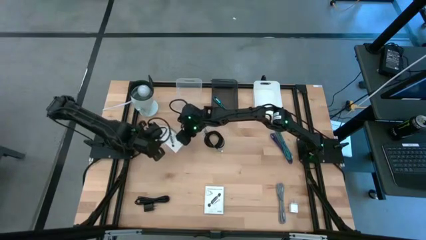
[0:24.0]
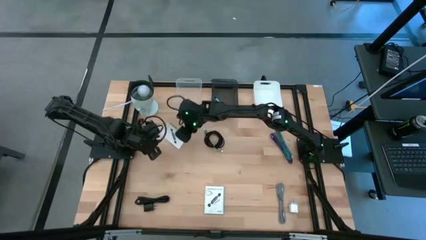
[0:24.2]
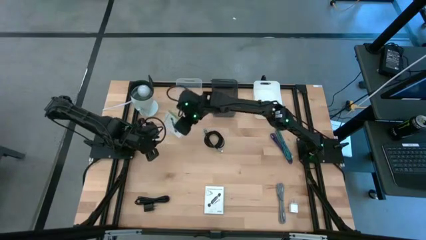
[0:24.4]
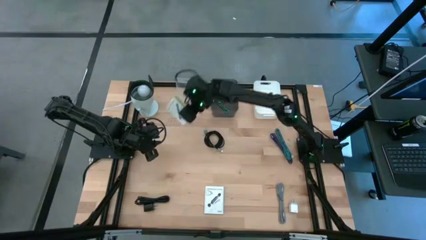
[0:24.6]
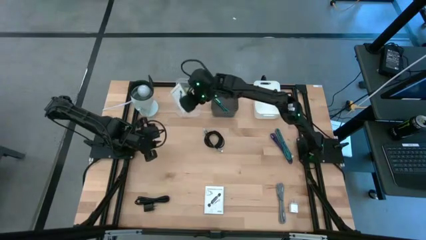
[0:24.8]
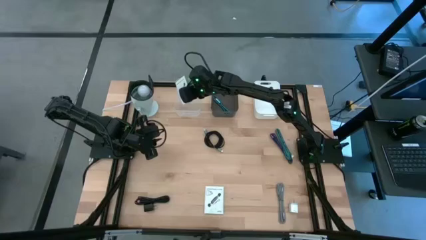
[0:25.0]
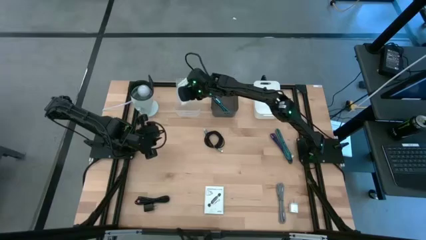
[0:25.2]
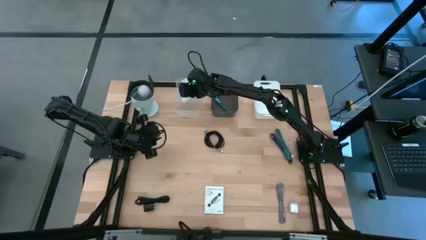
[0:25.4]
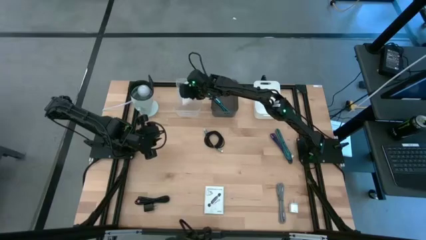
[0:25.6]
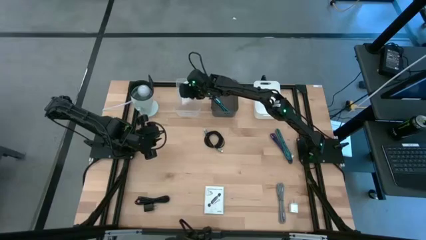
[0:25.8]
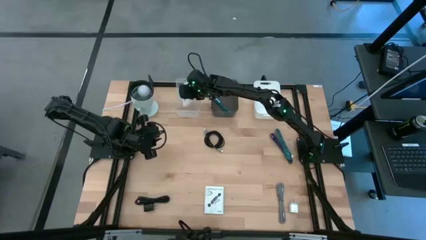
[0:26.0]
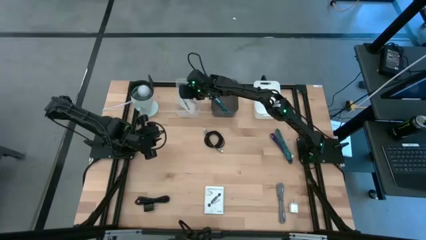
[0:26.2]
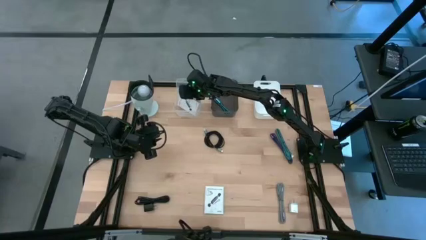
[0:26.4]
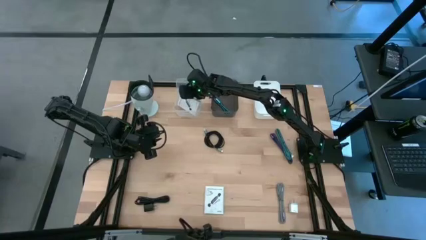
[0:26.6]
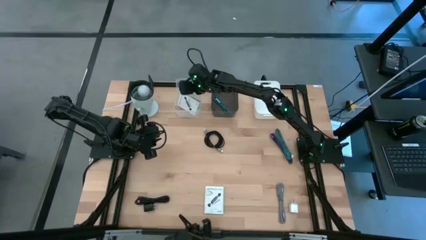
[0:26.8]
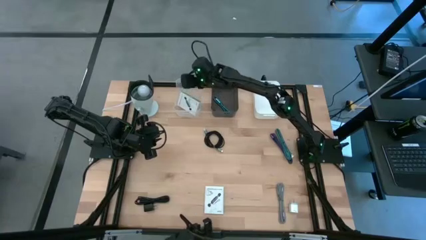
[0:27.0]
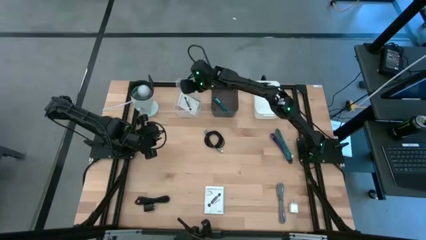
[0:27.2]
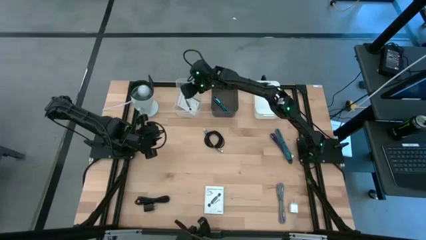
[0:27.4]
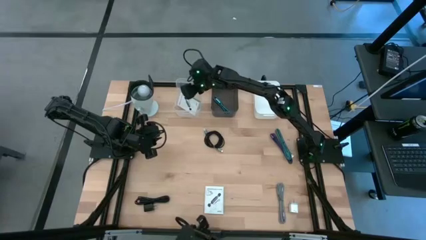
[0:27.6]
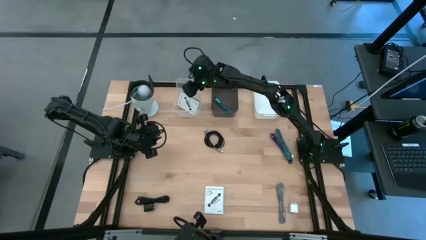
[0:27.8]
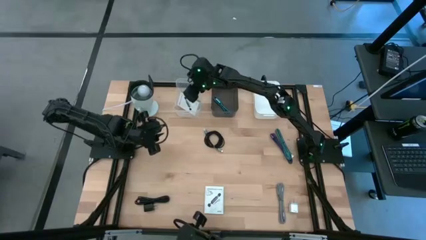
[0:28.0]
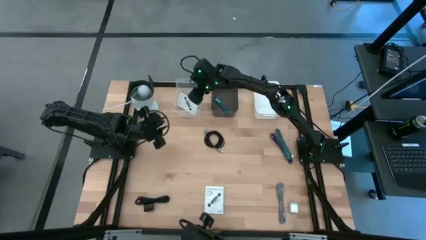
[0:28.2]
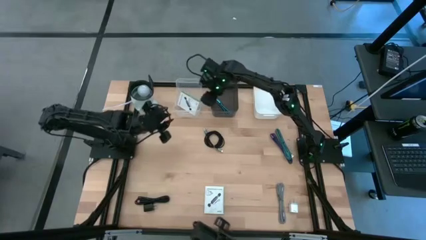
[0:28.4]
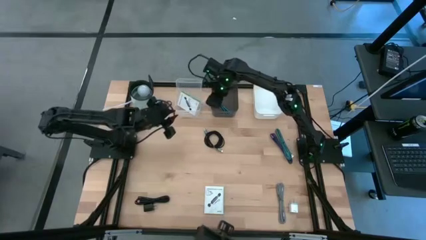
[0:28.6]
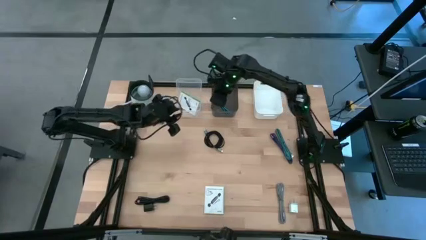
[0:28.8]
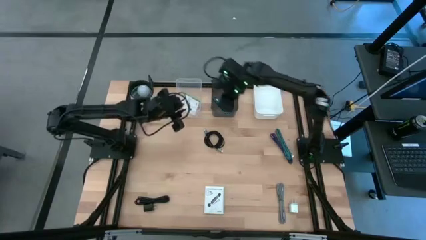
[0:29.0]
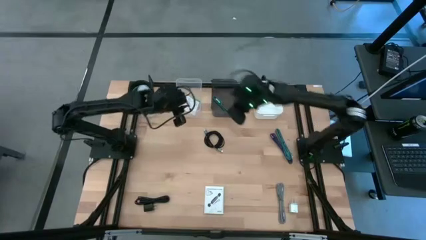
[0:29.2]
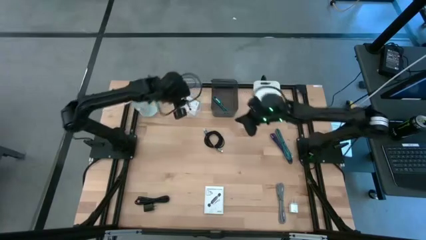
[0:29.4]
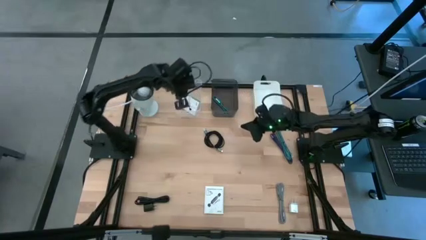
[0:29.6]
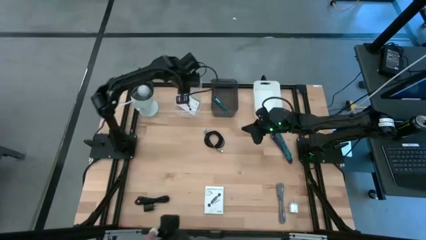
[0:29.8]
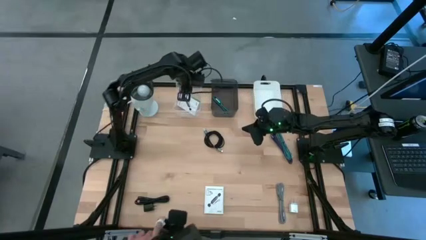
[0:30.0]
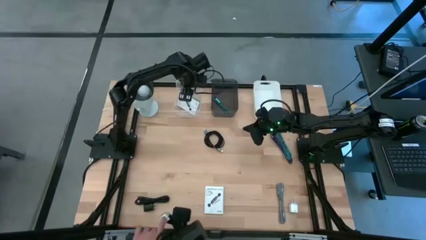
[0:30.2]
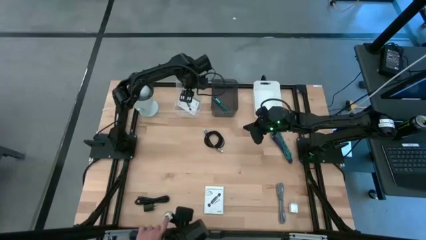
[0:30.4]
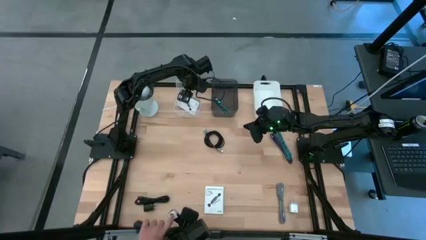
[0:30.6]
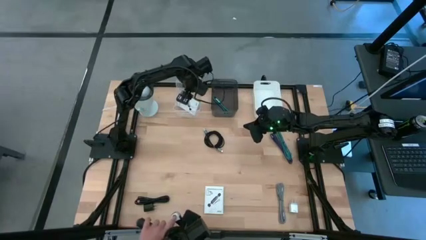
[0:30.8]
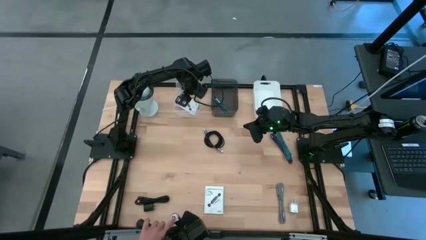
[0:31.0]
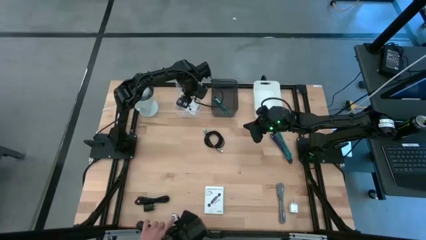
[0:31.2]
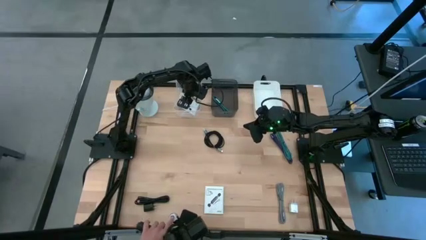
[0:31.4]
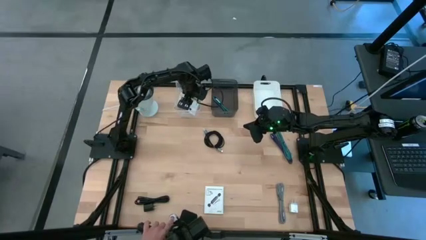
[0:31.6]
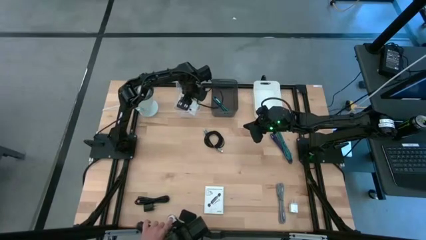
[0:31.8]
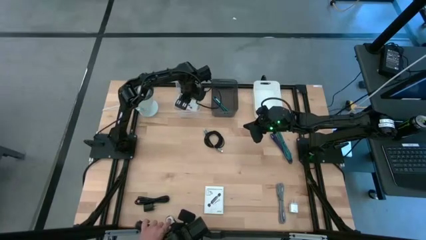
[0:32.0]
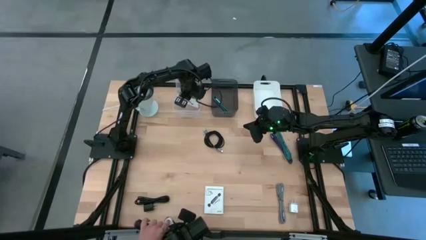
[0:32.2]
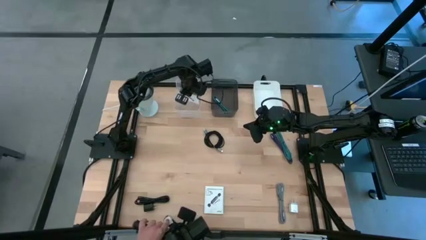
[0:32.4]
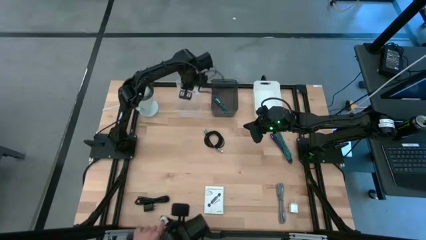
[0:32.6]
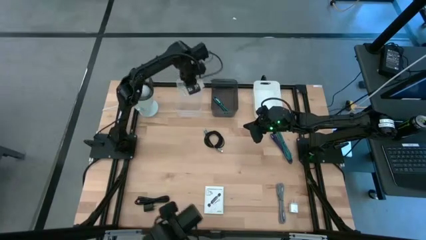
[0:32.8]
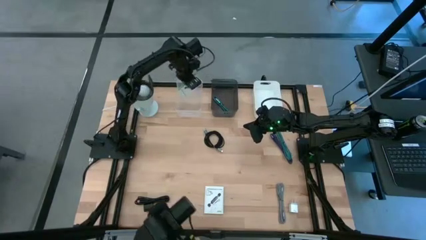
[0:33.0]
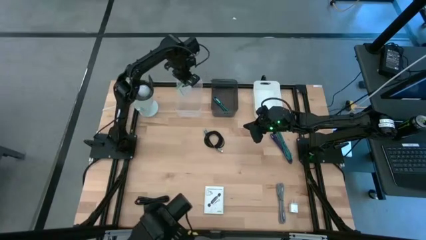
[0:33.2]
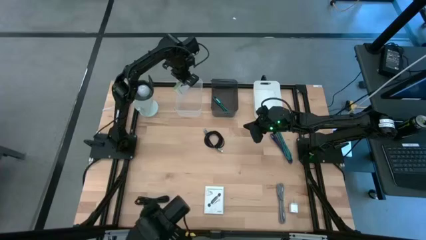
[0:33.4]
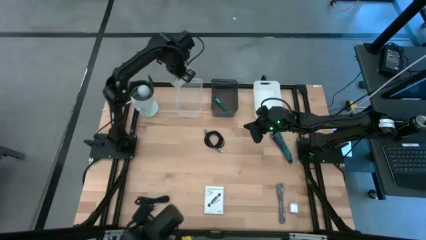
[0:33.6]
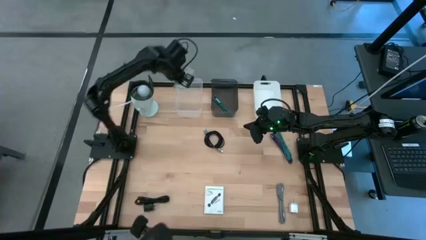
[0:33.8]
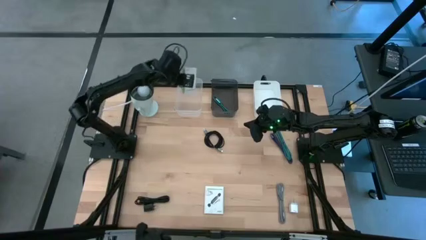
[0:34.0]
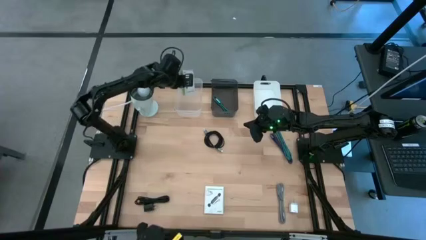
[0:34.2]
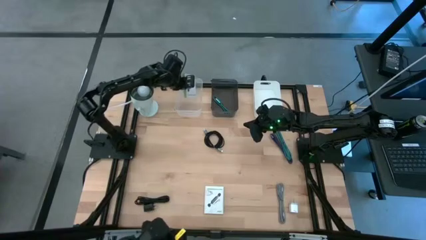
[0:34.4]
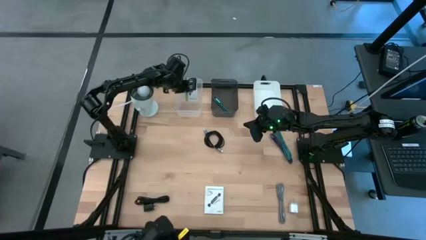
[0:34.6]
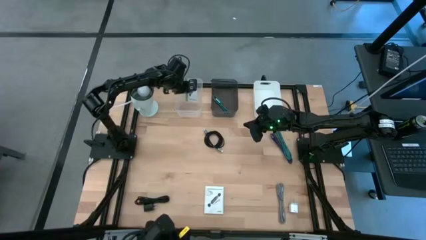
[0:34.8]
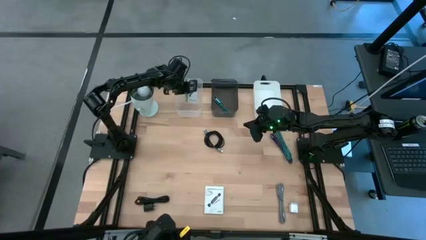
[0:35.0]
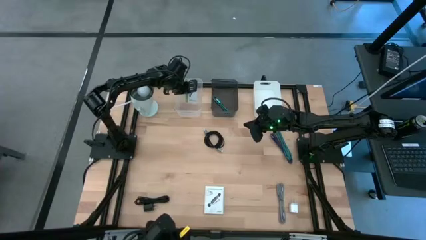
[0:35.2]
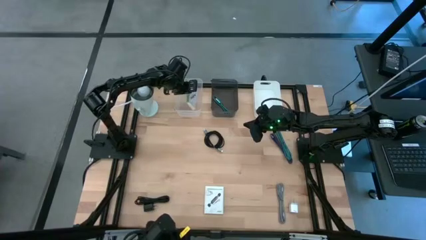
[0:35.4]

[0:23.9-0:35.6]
Task: Pick and place items into bin
Put the top card reader box into the transparent bin

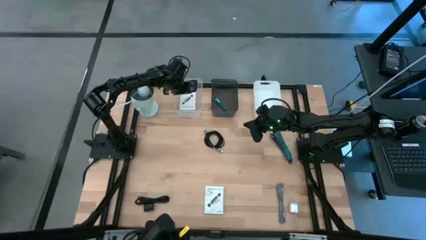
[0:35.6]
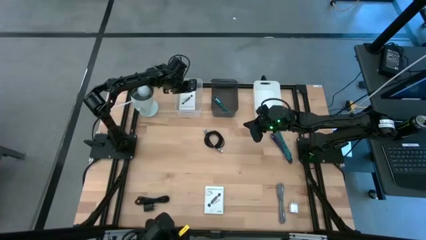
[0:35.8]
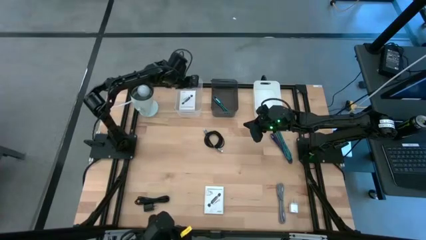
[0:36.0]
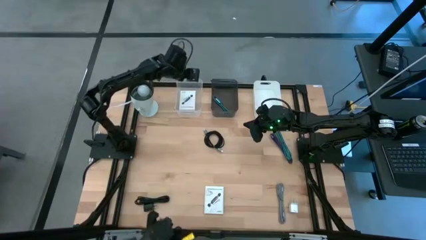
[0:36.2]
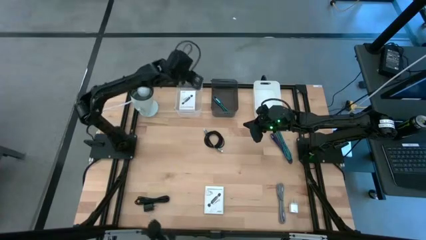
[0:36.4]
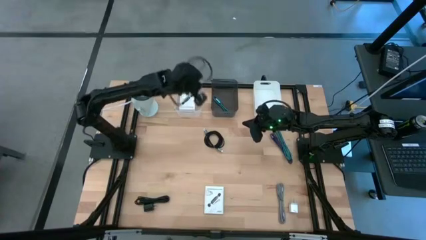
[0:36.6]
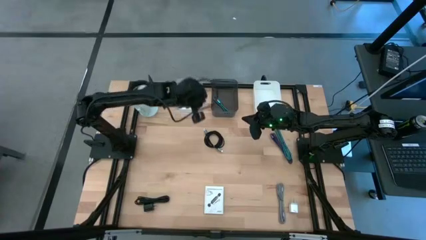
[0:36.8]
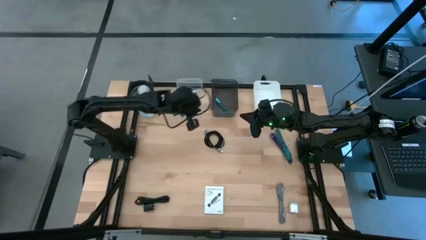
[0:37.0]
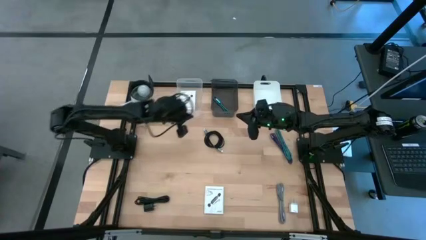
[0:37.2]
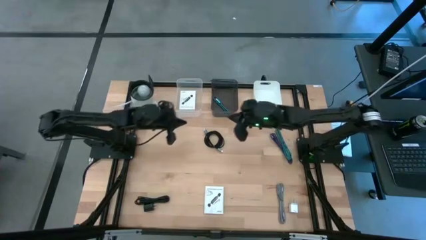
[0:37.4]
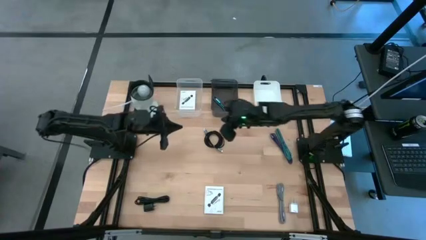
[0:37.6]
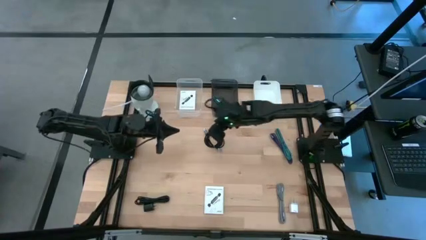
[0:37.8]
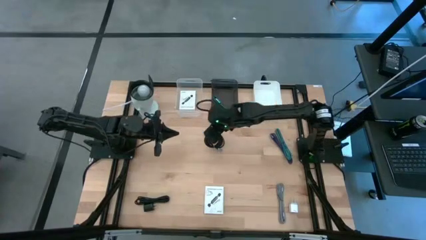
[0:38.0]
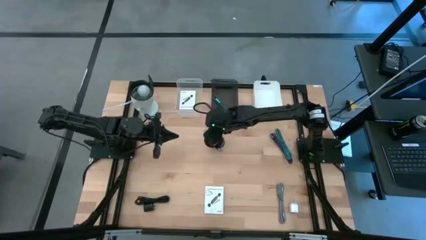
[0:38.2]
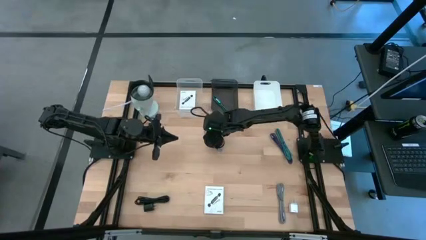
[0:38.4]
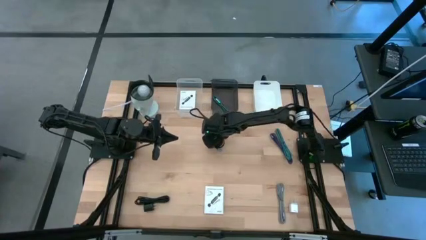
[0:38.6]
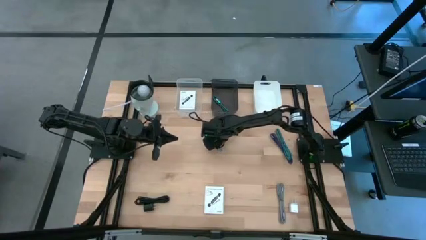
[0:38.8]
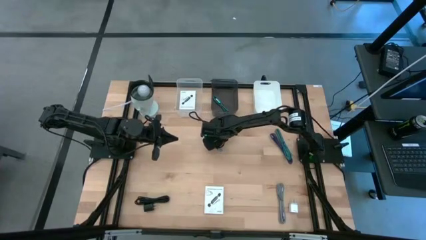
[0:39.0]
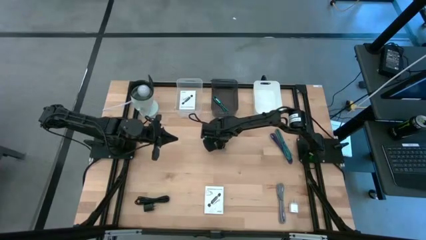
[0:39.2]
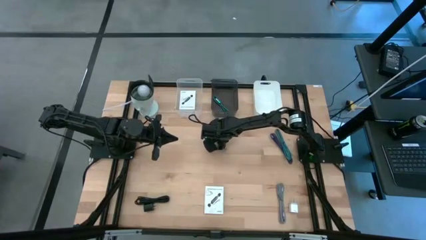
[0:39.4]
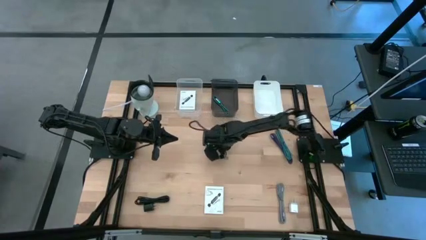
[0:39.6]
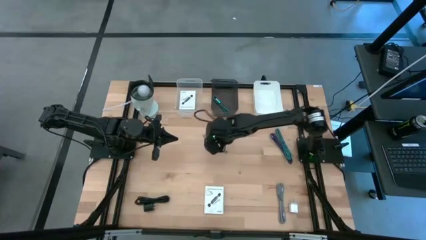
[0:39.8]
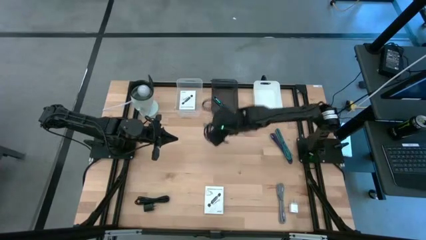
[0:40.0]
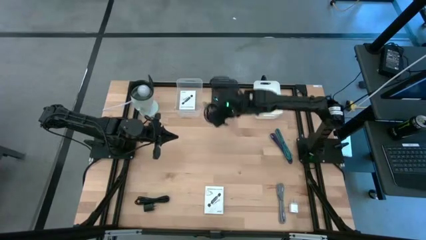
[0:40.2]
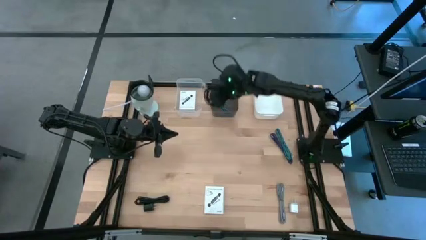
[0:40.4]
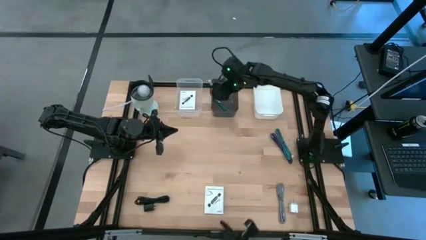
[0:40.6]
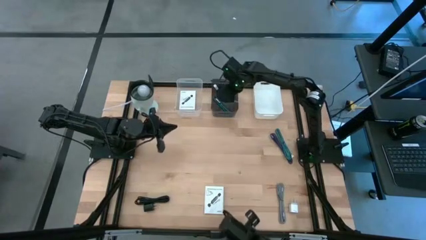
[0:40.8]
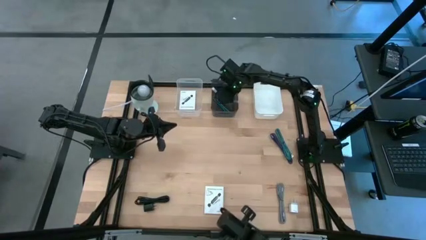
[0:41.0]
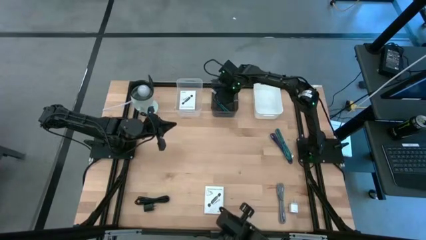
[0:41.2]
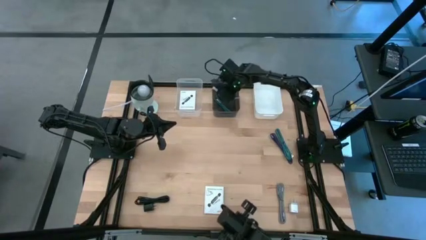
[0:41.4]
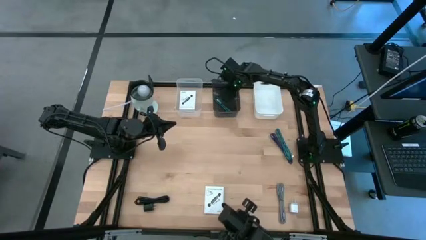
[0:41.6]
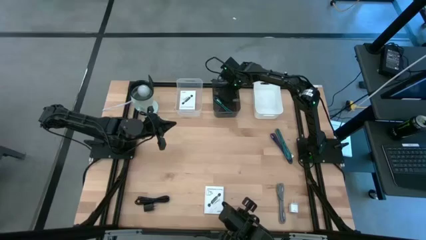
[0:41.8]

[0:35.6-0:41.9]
Put the top black charger cable into the black bin
